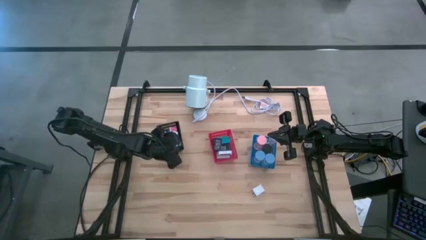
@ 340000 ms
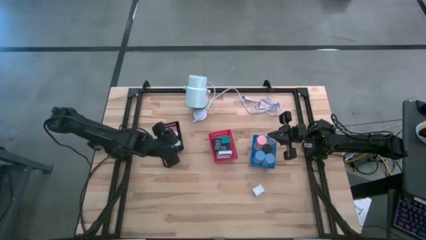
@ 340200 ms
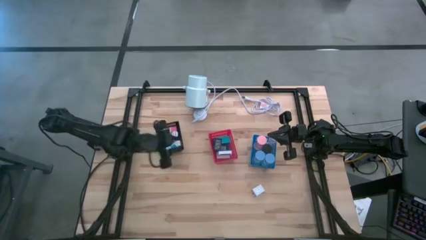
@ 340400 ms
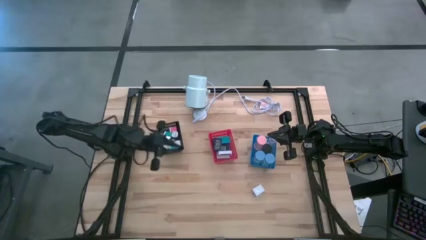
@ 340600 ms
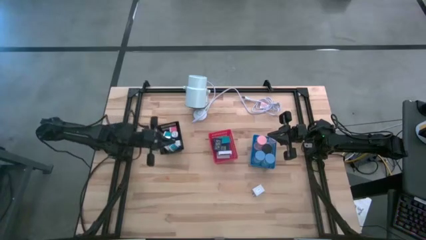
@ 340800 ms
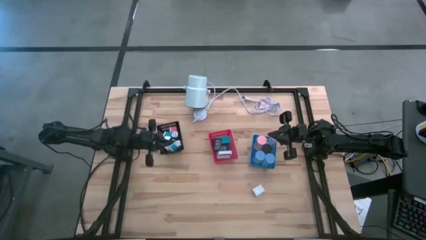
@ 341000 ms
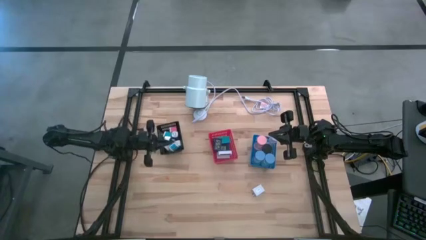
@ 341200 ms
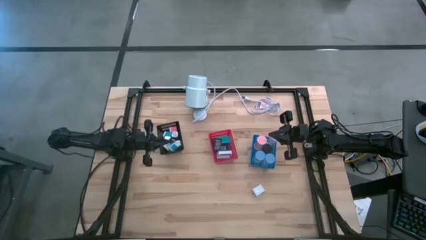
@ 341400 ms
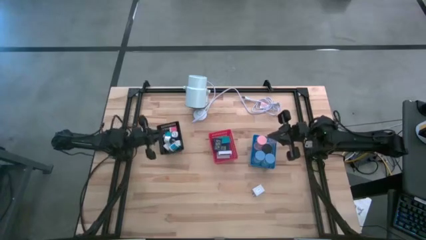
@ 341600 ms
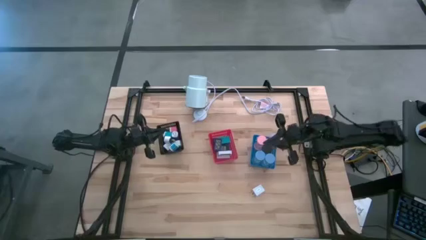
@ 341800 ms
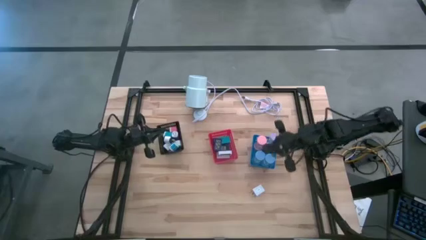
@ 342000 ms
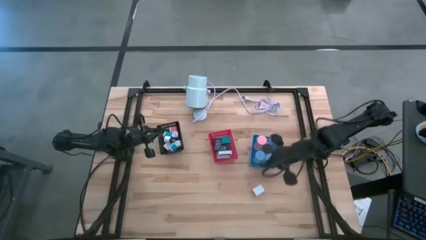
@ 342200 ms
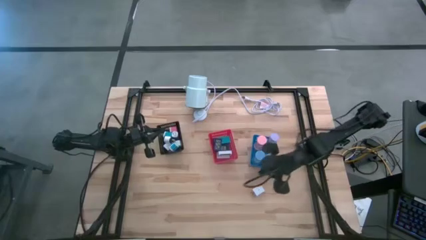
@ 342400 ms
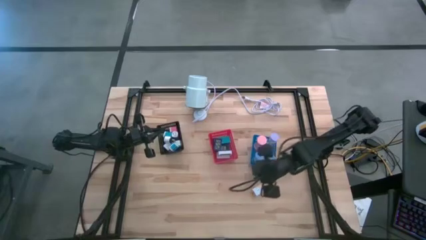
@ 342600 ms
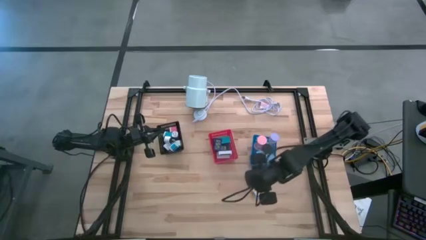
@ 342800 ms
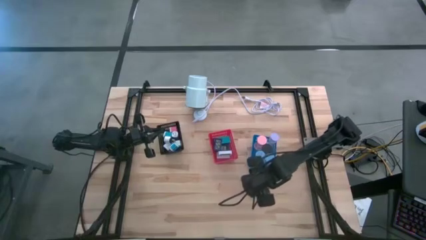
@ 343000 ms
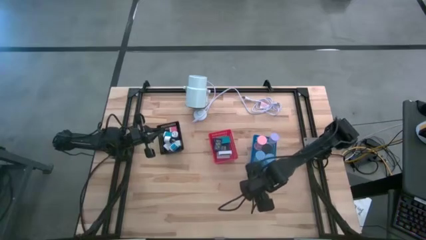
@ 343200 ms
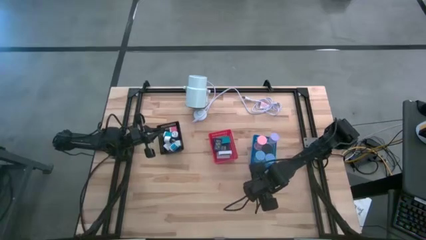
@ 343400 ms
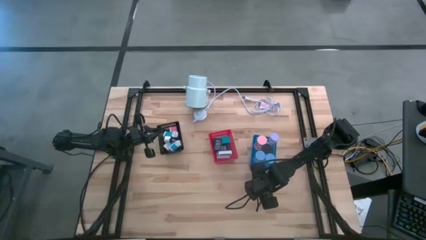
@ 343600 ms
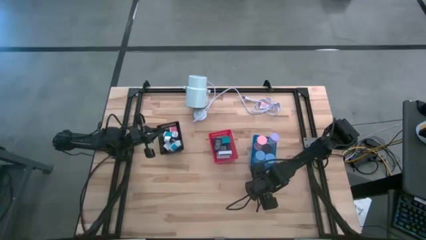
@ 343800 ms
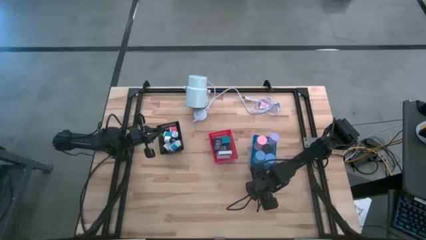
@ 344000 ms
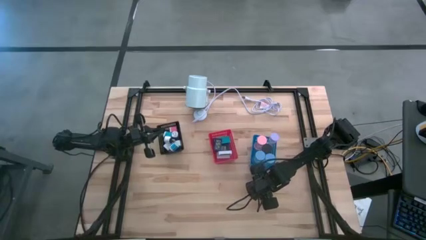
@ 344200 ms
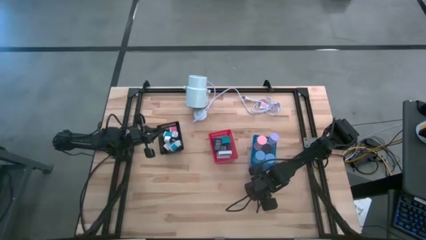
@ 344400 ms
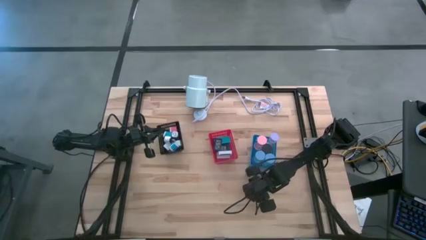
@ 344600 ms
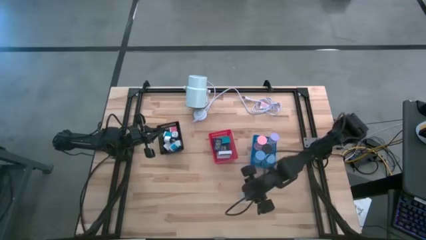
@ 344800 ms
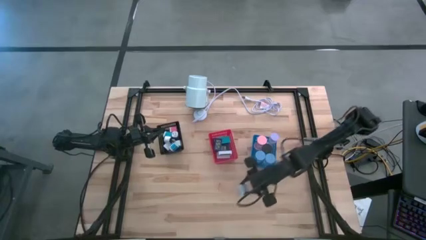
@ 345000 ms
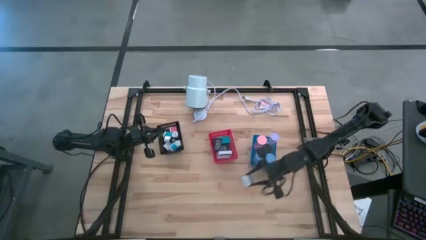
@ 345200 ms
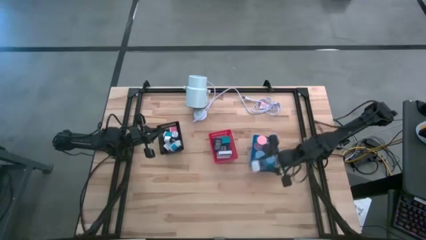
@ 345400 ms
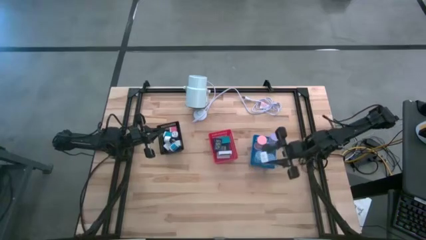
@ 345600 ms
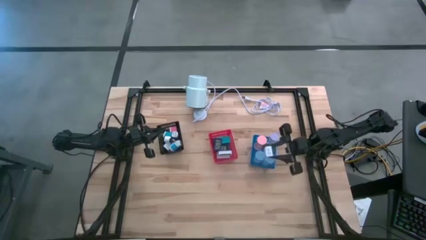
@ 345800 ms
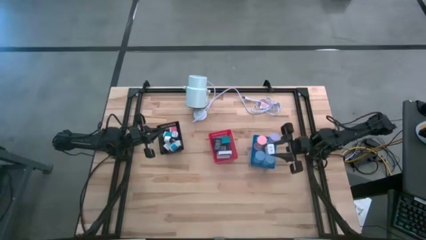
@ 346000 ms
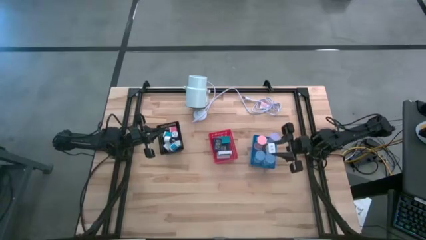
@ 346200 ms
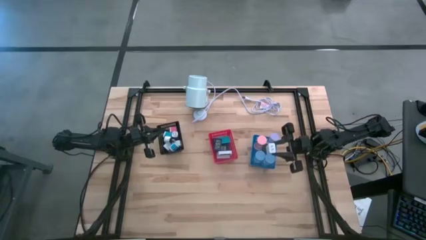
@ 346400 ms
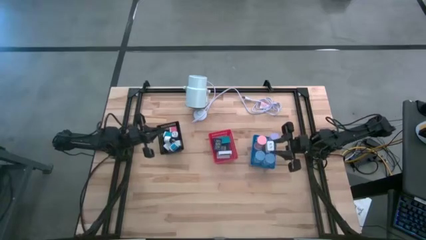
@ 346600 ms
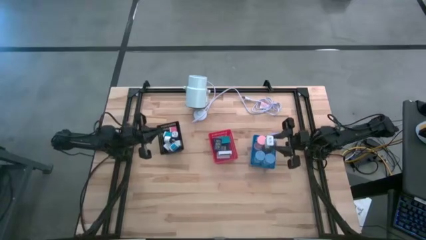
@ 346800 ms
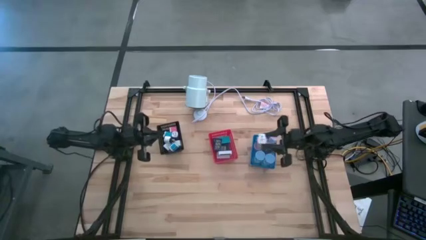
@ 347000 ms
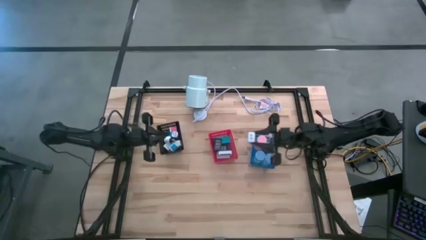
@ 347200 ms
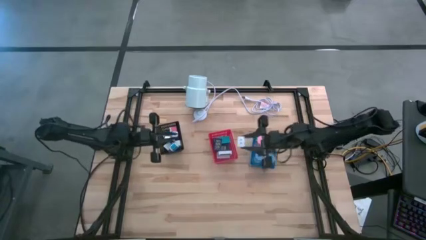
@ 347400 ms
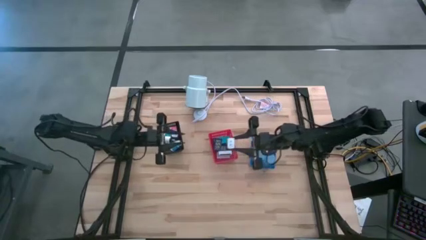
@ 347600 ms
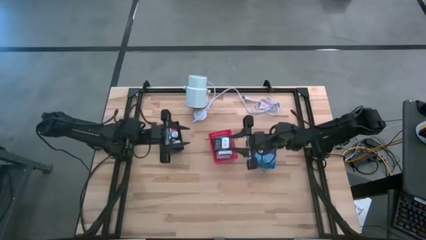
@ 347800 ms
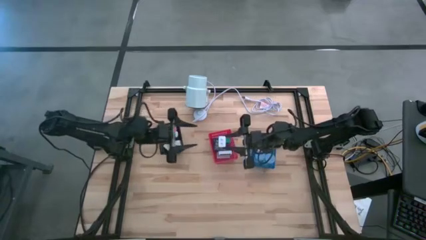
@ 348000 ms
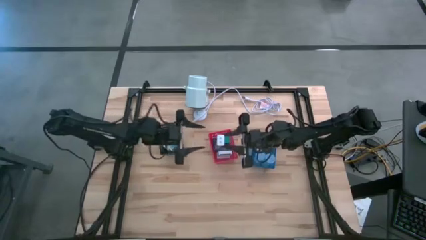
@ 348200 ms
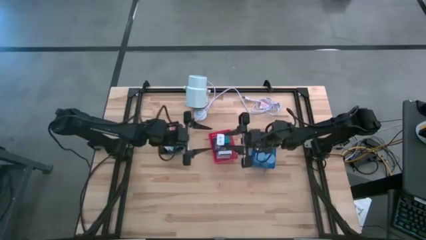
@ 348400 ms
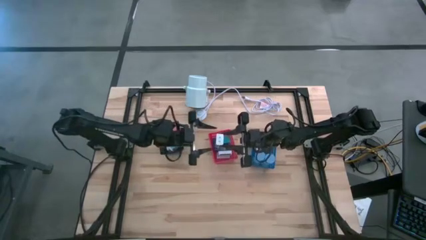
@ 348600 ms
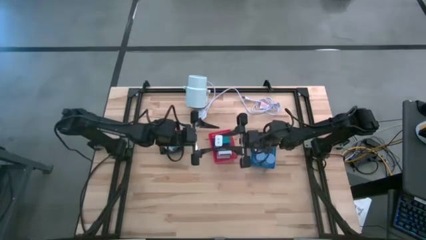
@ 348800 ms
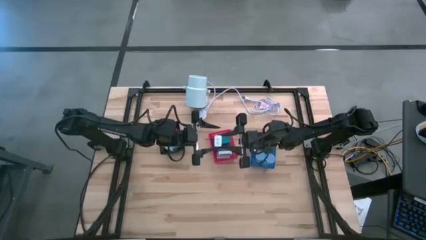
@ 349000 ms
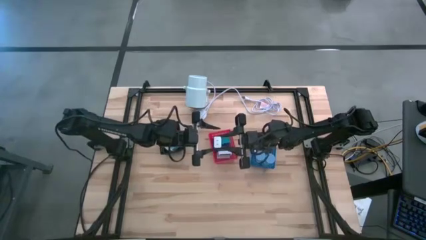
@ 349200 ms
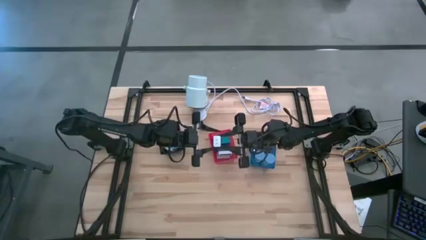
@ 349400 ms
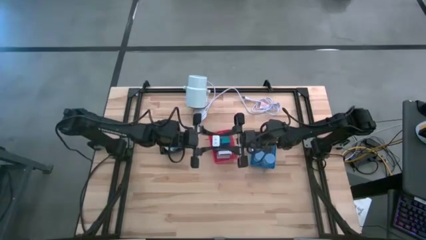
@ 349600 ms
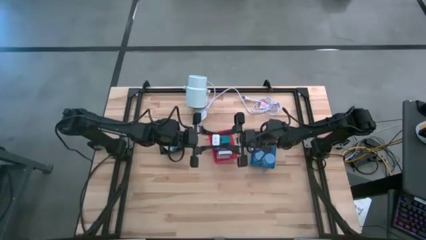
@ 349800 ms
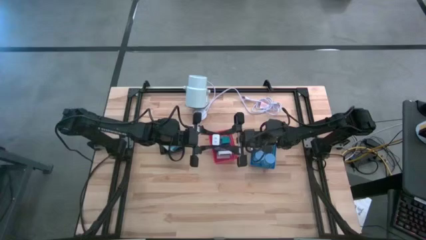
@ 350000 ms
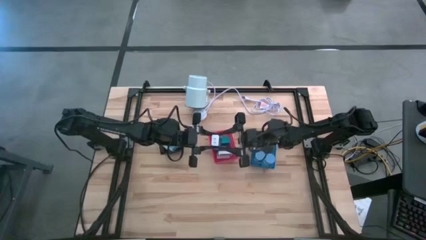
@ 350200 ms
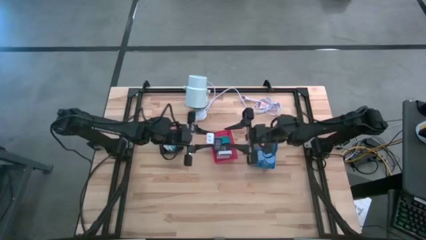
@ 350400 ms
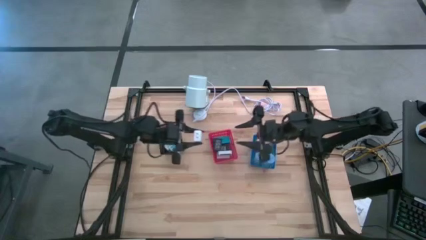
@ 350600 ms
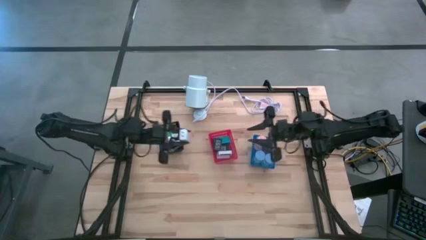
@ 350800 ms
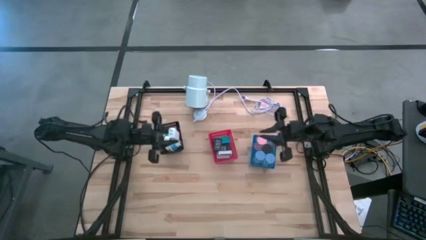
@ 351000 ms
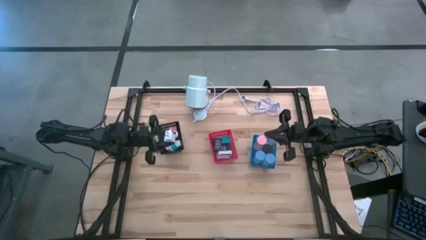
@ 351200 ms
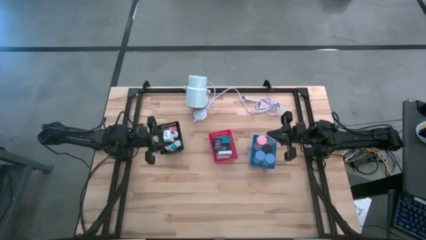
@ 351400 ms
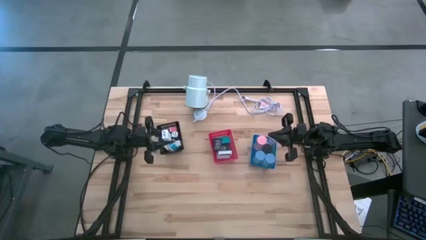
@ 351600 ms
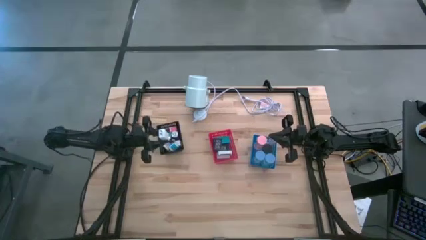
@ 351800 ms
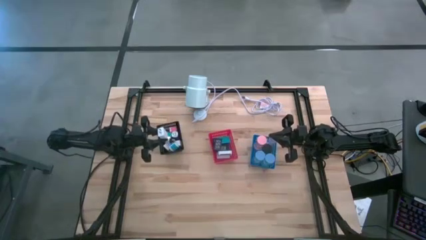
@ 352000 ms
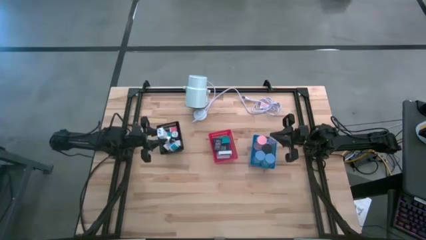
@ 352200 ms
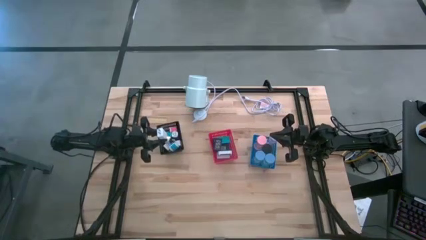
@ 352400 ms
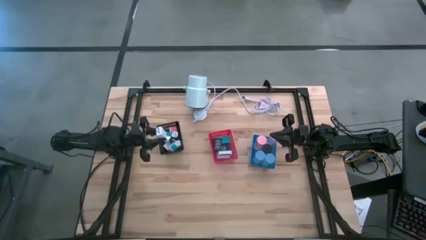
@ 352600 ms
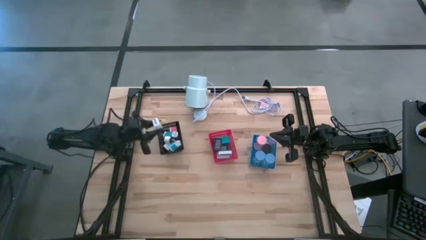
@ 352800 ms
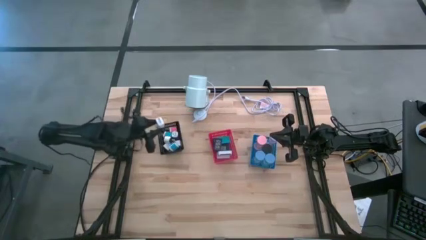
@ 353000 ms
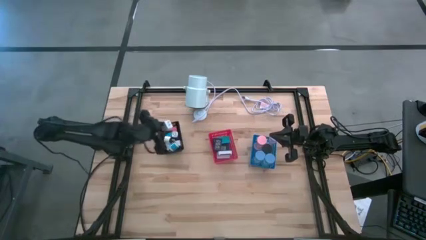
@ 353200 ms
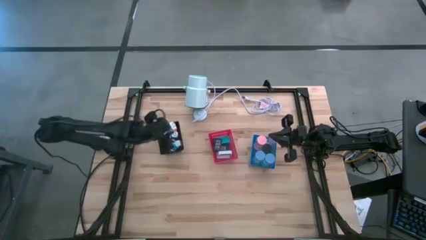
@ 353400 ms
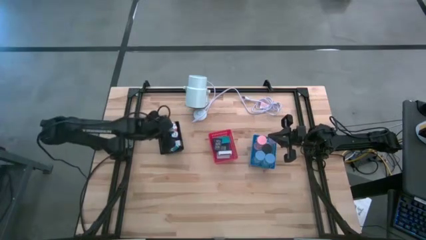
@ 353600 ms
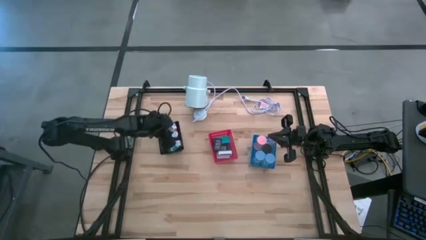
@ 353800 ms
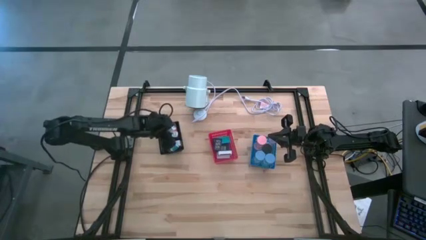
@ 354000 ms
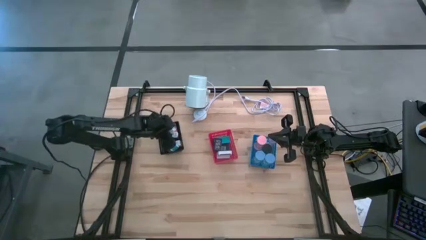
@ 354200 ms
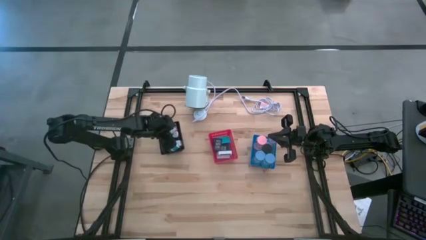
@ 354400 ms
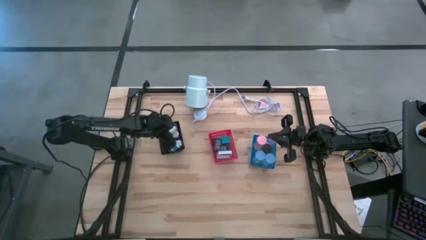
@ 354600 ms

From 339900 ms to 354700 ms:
Task: Pick & Place Office items
Put the white charger adapter into the black bin

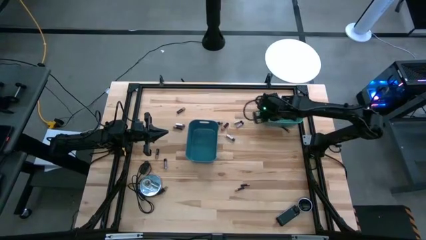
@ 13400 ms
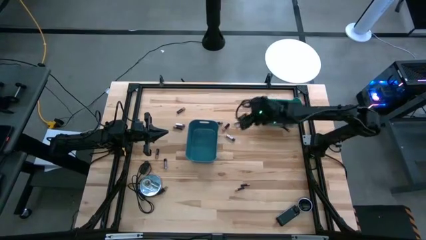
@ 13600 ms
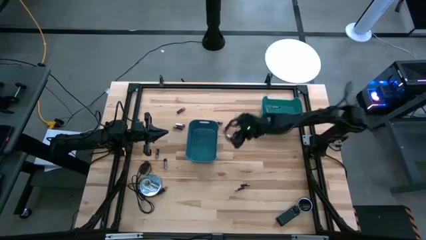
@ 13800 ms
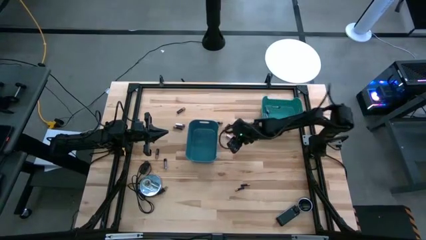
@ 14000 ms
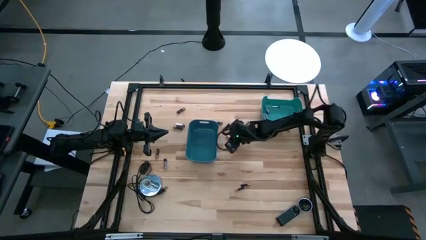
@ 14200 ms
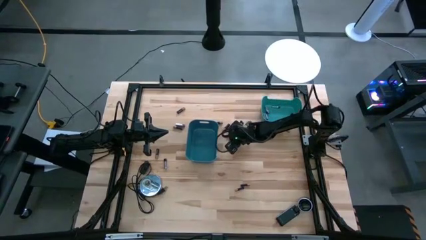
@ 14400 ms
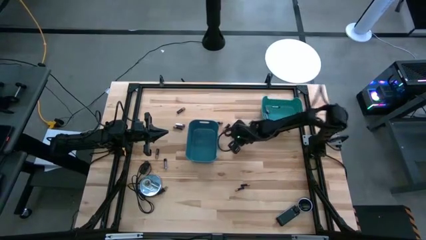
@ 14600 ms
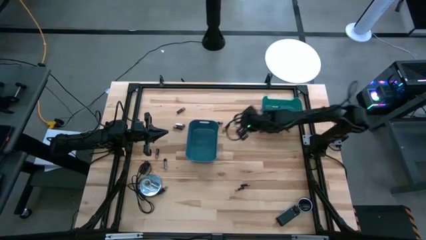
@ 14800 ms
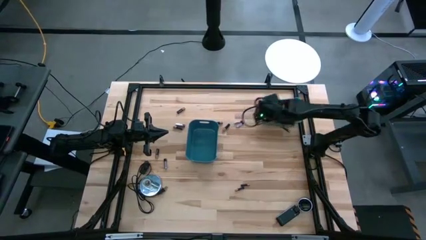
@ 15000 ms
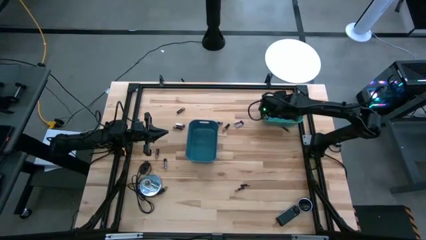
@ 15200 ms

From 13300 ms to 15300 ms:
Task: Sort batteries
Put the silver battery into the green bin
